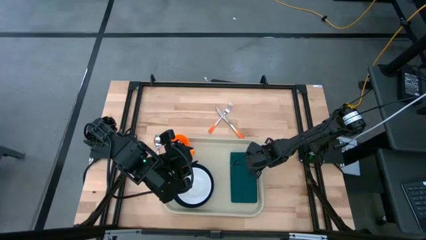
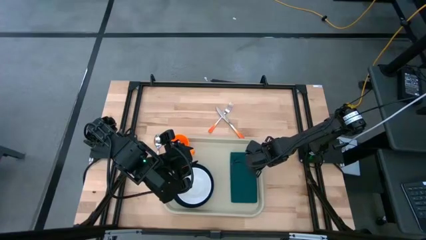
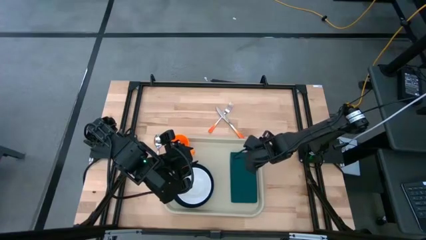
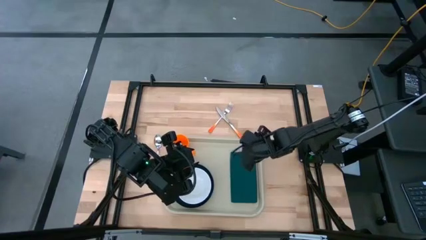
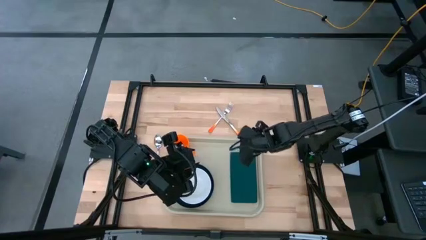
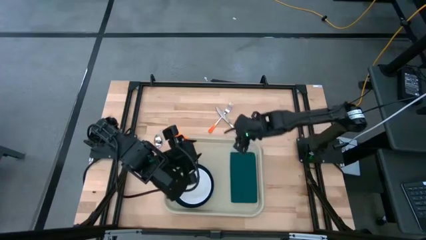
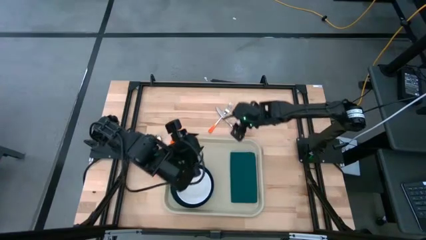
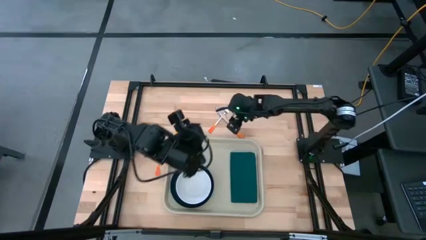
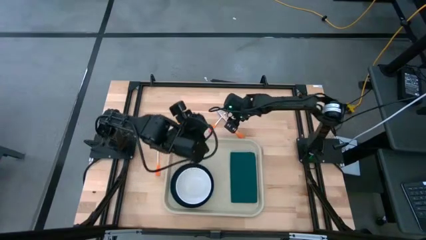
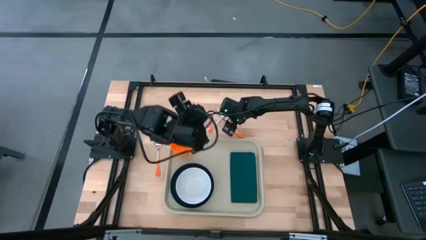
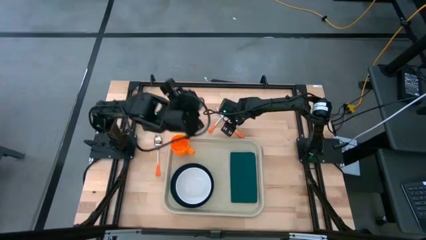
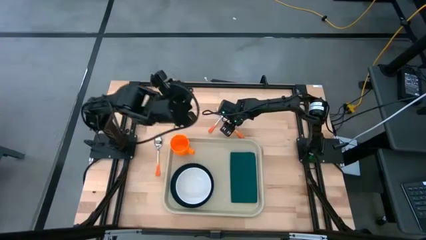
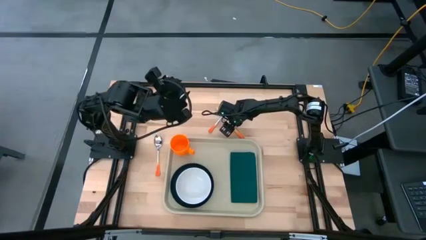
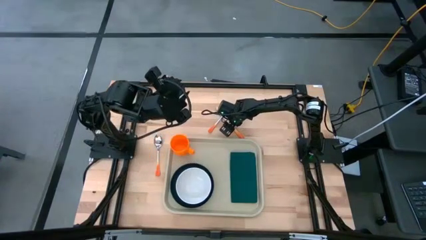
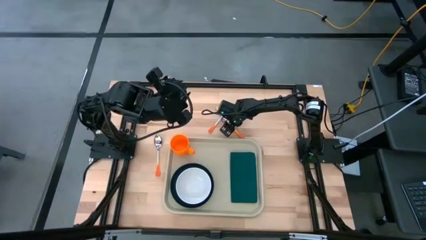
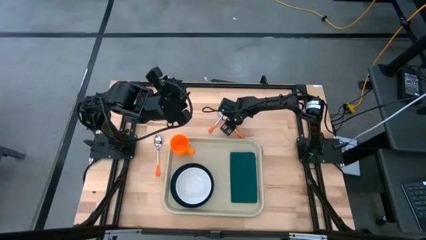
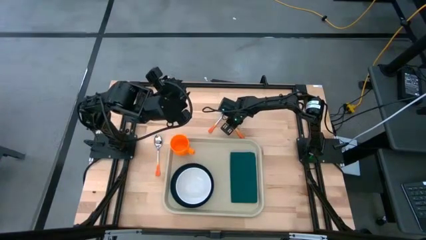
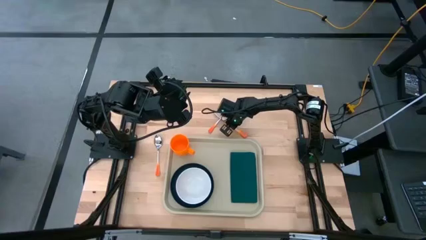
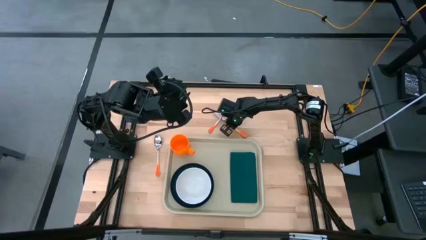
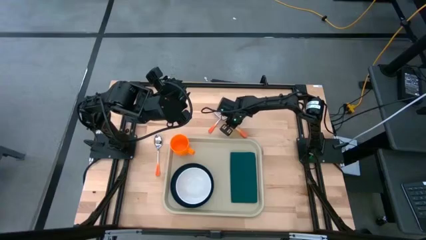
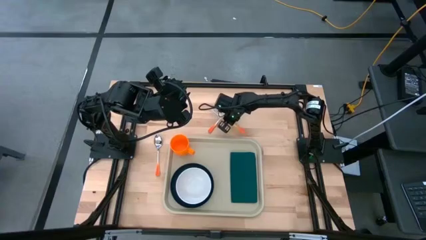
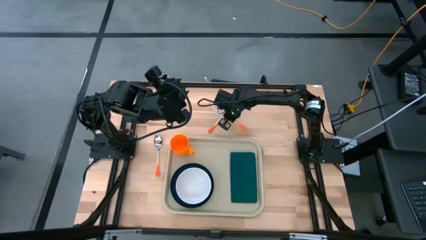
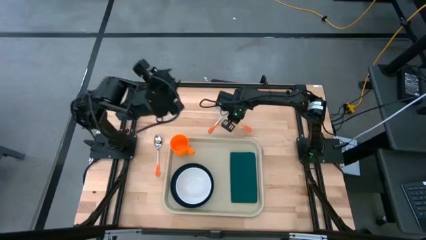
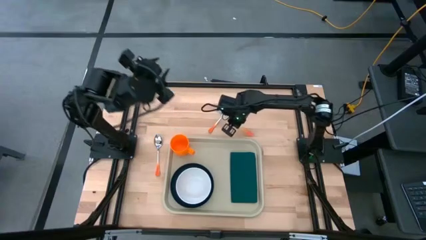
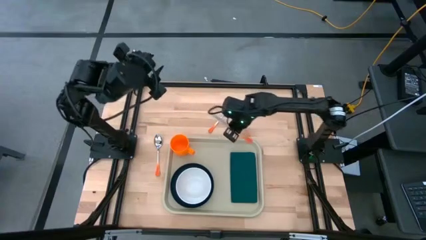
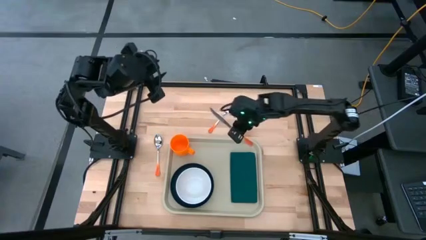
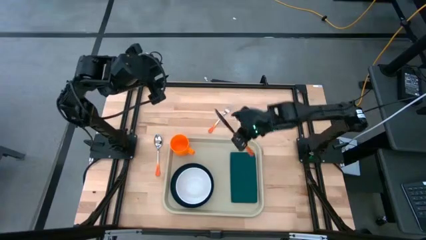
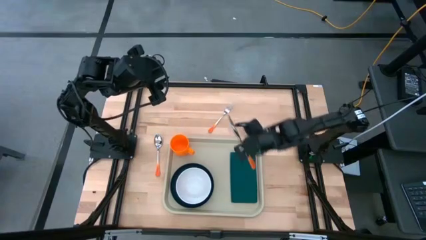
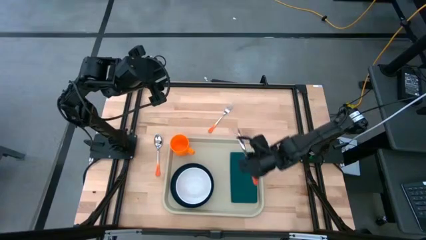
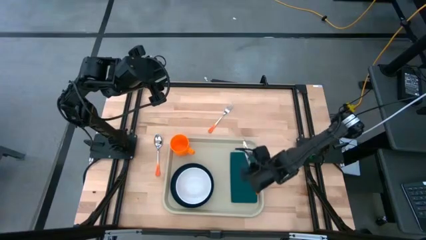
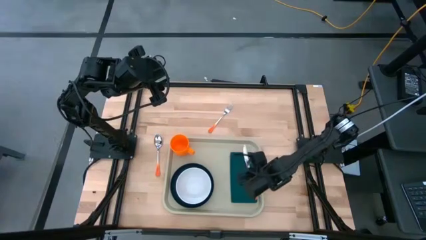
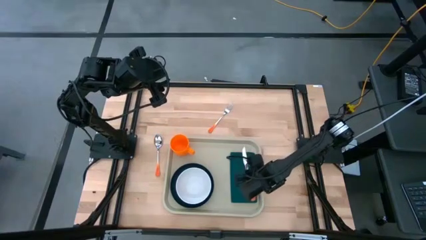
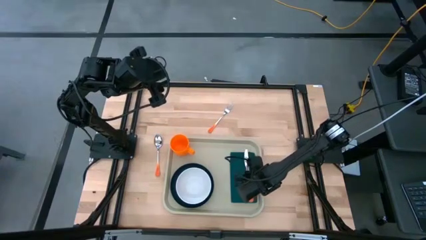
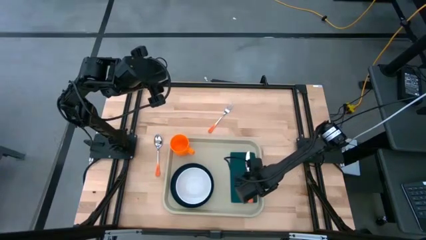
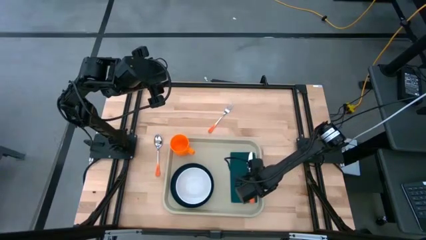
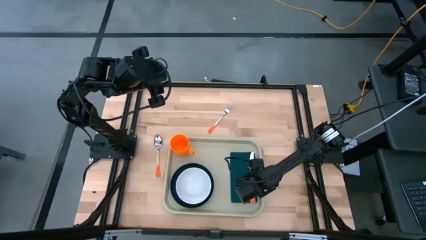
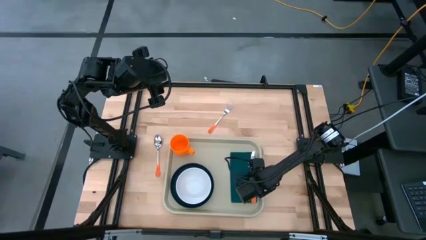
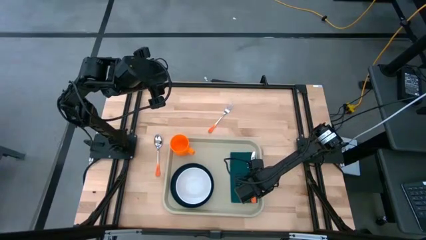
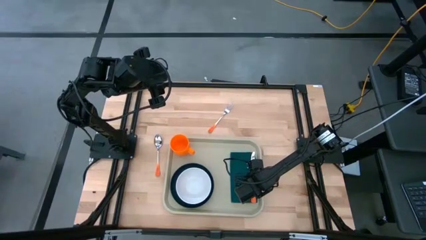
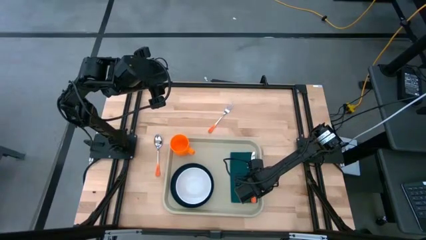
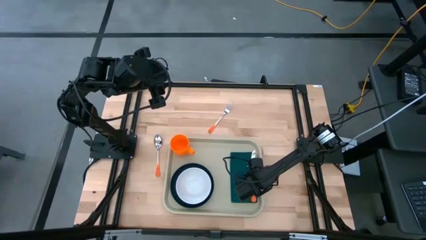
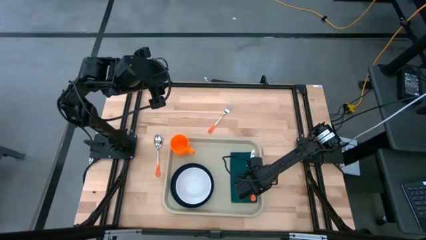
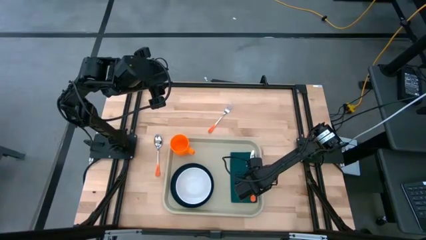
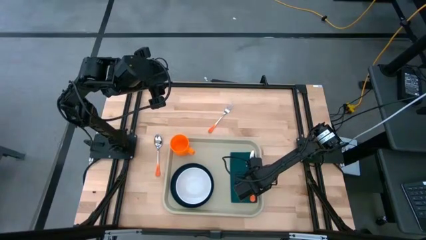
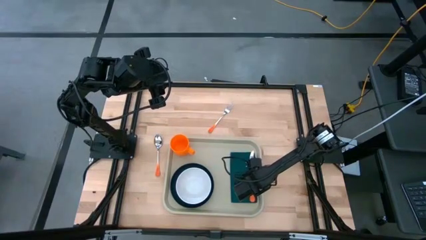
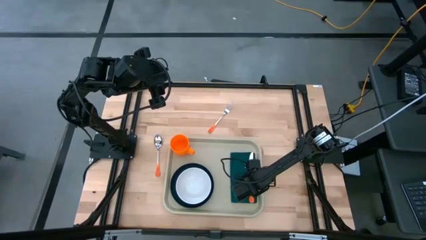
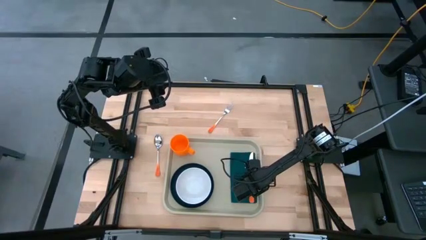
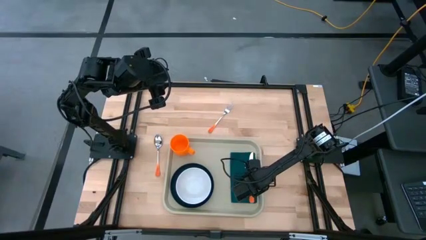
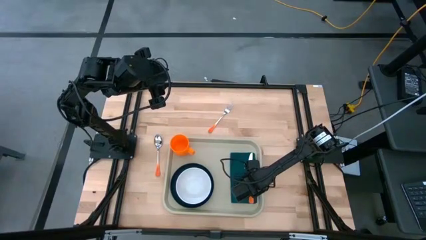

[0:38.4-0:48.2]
Task: Set up tray
Put the orange knife on the green napkin

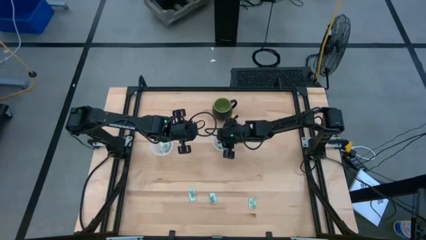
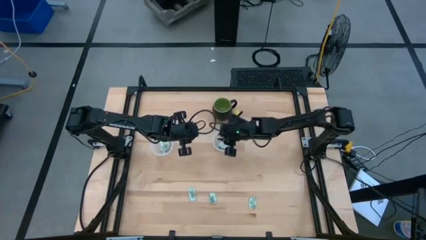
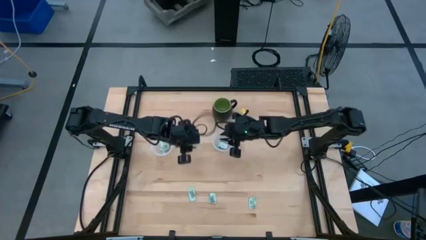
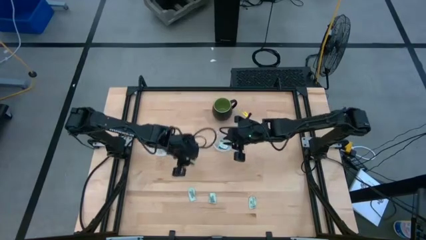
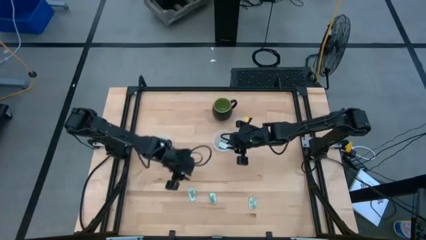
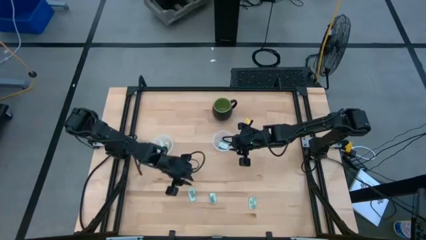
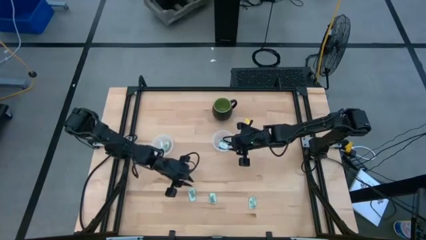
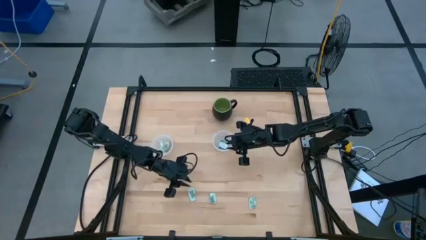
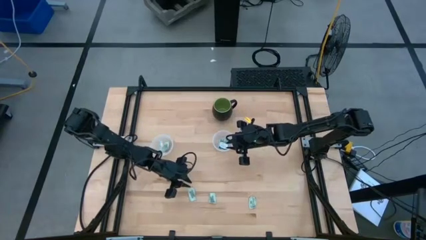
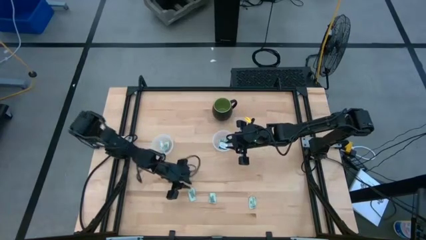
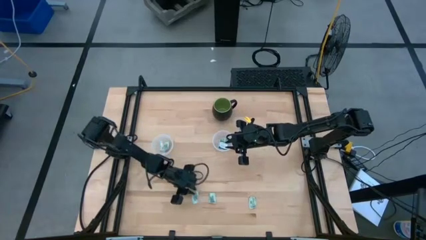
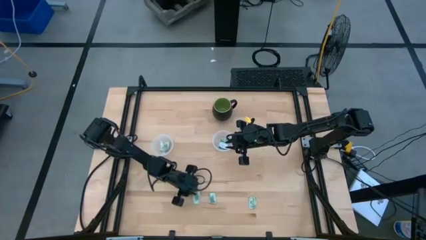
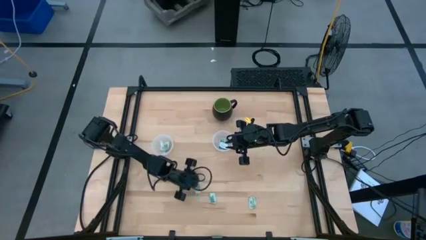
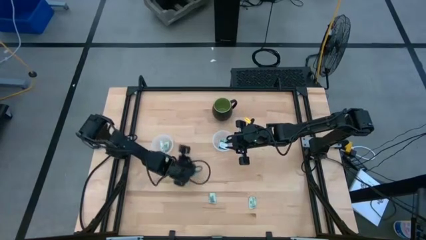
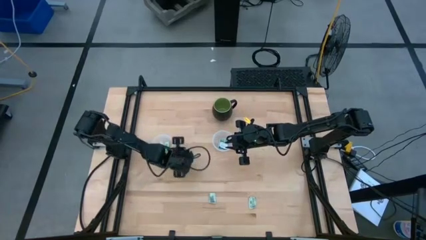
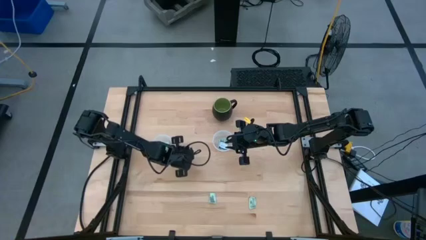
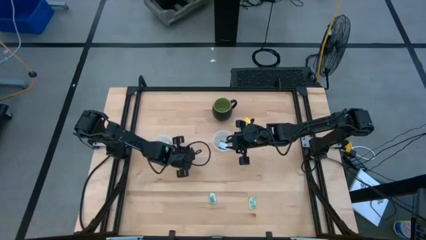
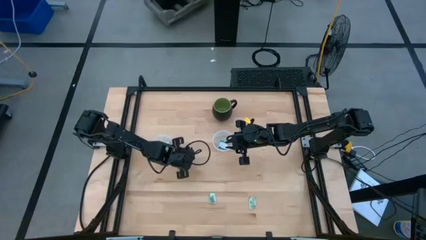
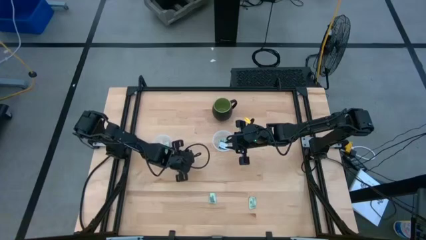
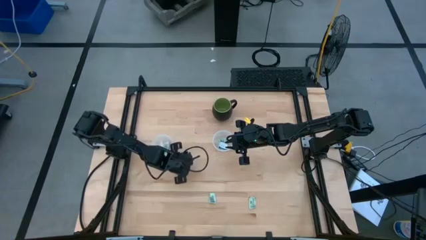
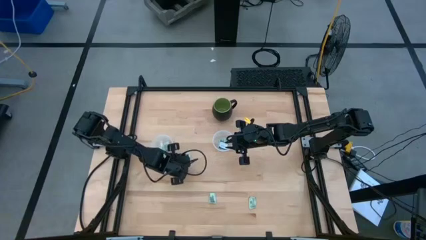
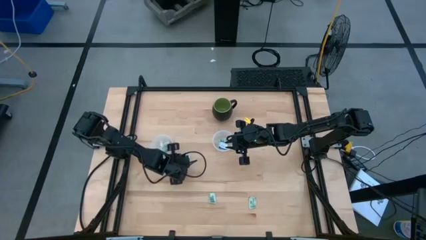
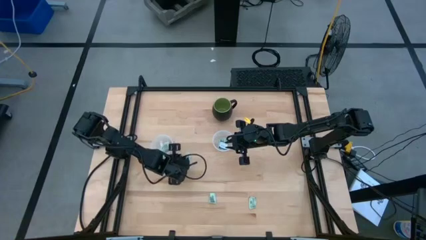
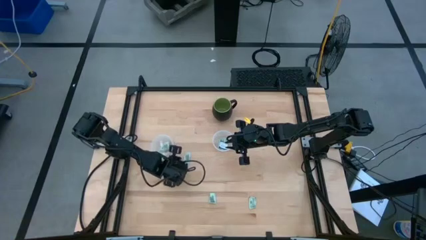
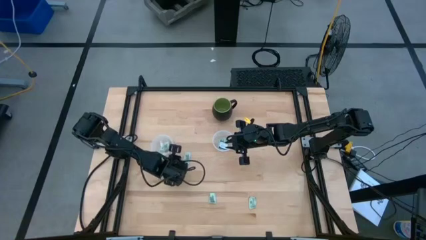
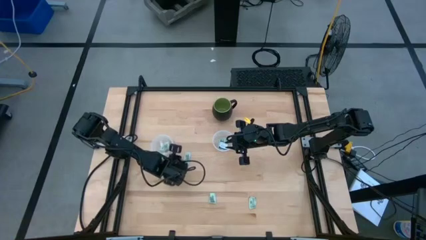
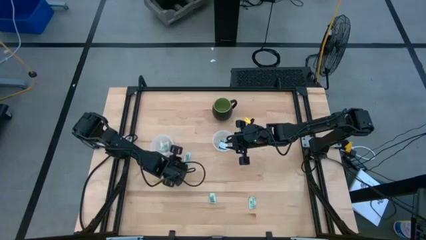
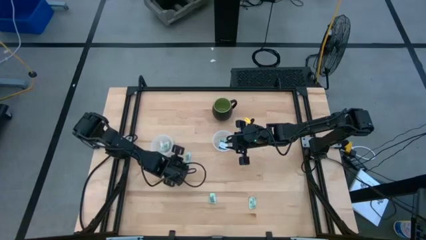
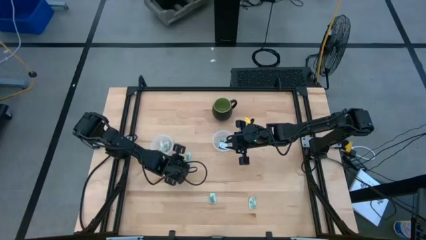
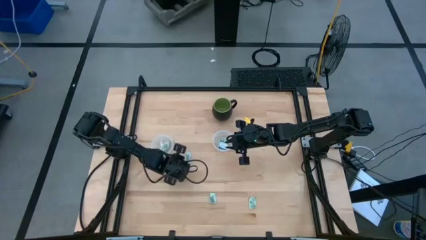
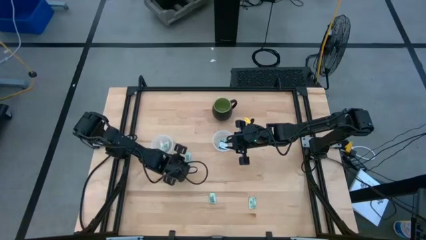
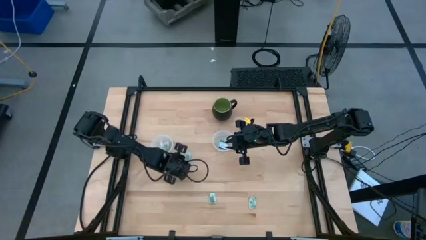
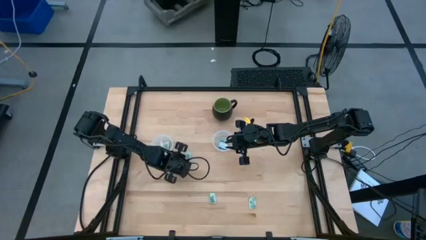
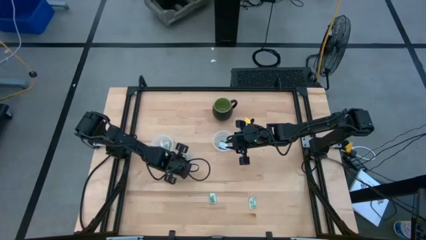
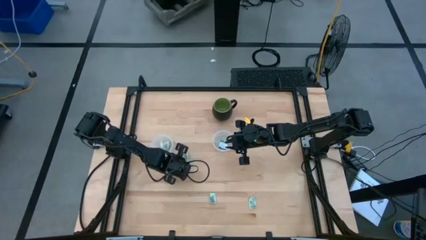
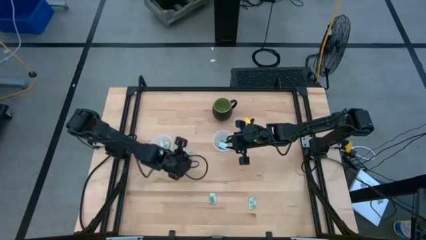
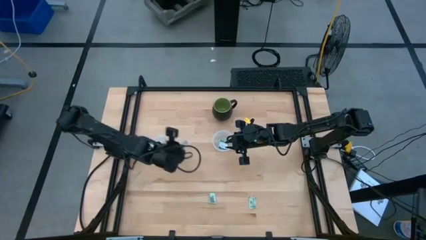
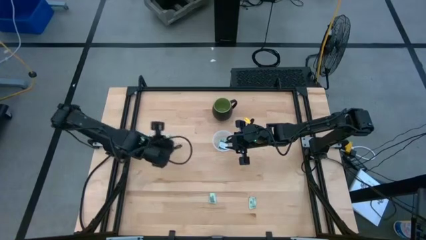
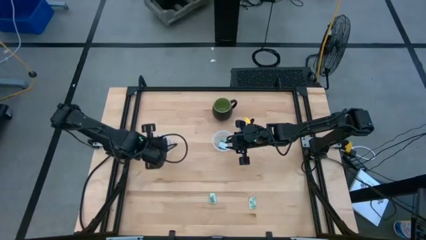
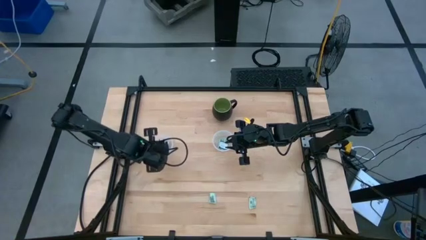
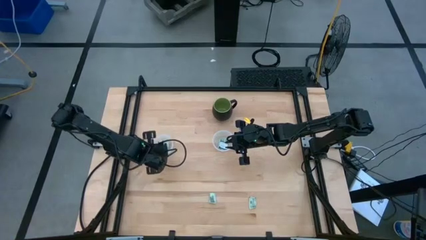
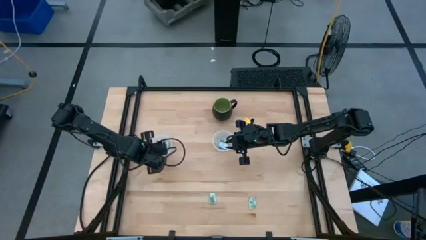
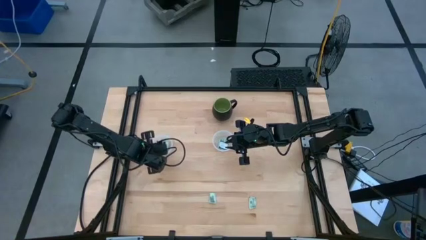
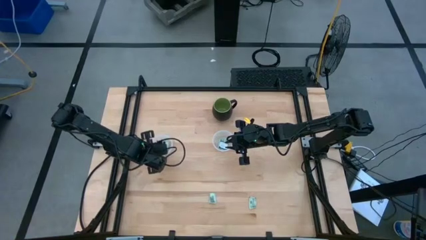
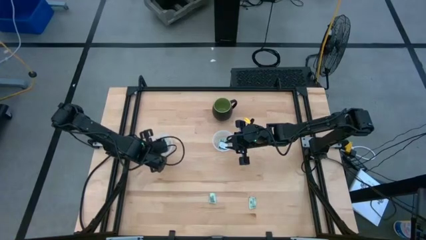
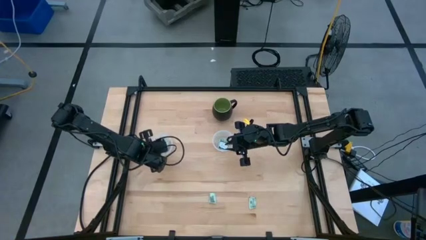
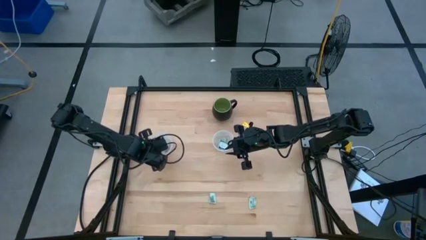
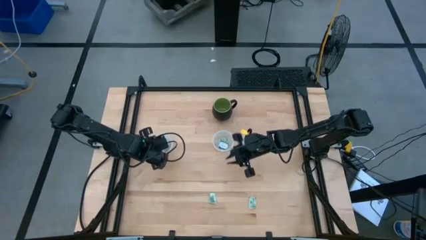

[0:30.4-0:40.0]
Task: Pick and place Stevia / Truvia into bins
Put the white stevia packet into the left transparent container
